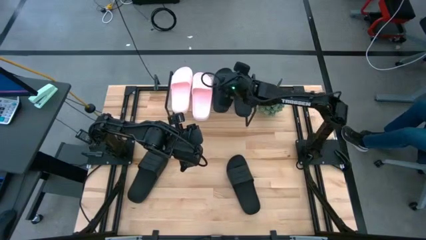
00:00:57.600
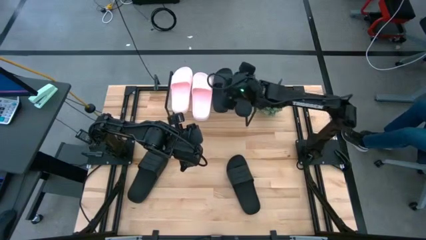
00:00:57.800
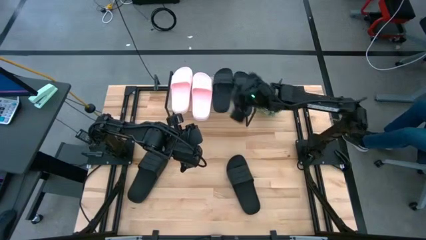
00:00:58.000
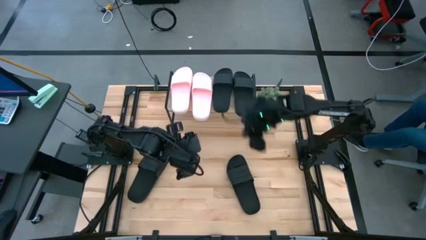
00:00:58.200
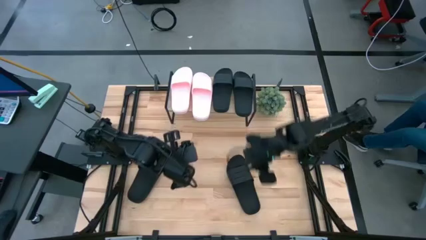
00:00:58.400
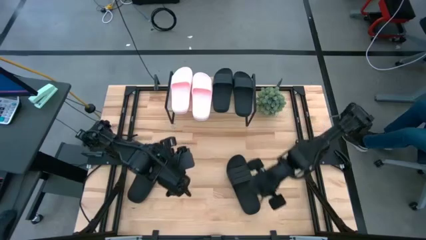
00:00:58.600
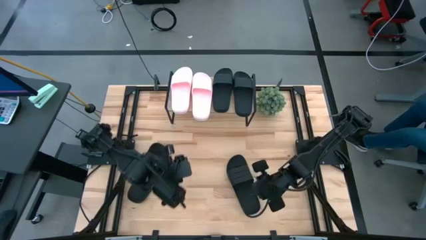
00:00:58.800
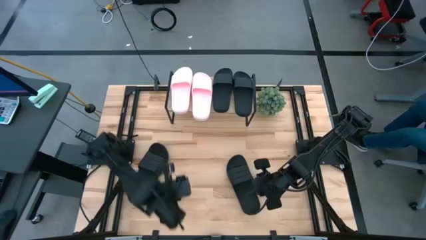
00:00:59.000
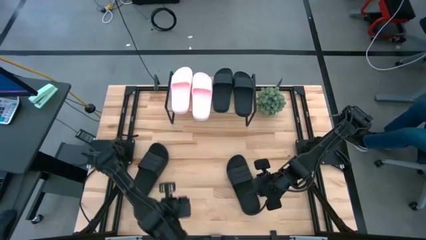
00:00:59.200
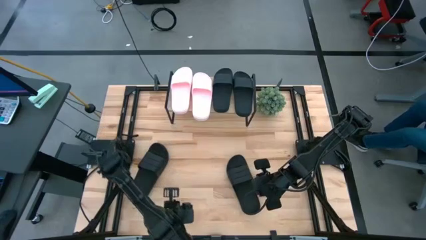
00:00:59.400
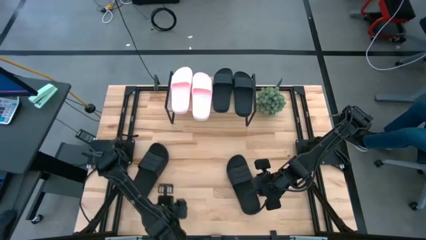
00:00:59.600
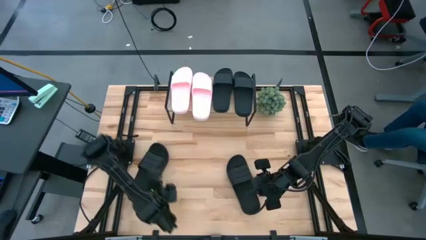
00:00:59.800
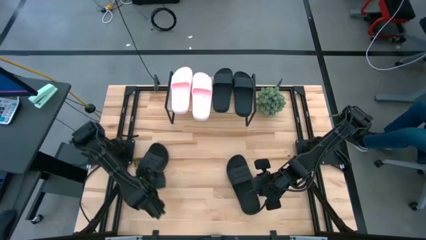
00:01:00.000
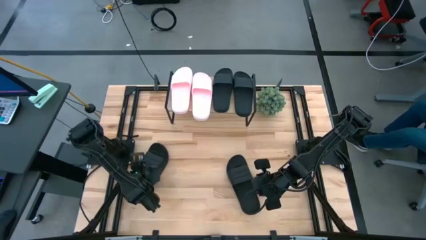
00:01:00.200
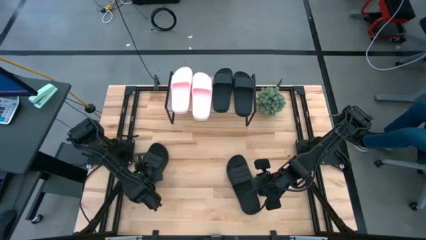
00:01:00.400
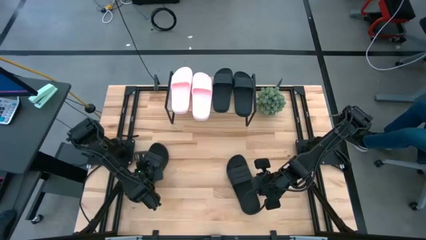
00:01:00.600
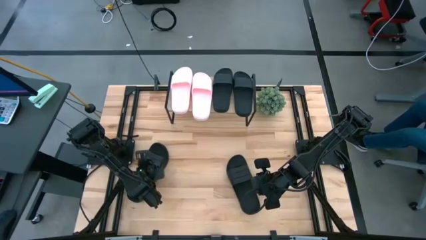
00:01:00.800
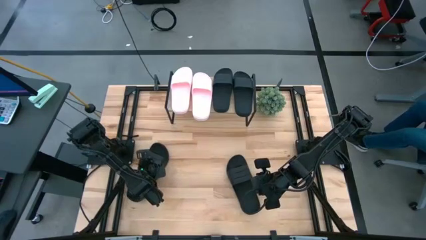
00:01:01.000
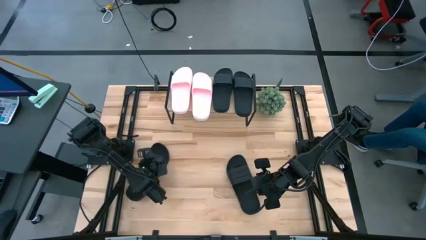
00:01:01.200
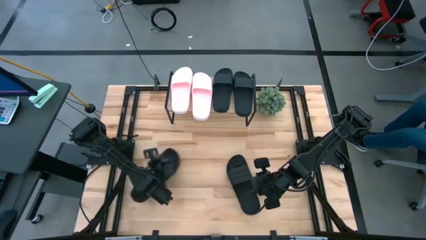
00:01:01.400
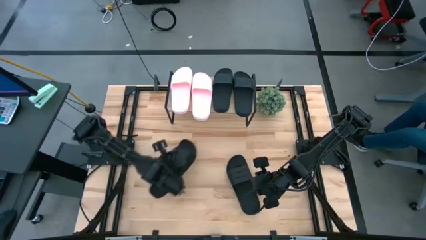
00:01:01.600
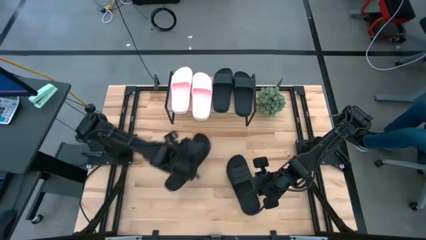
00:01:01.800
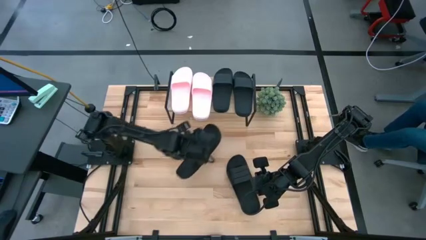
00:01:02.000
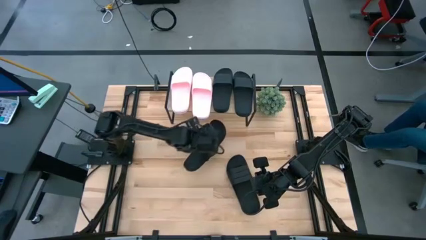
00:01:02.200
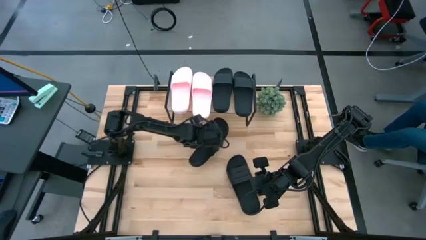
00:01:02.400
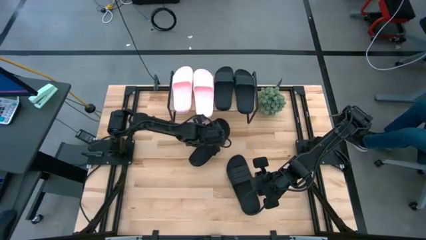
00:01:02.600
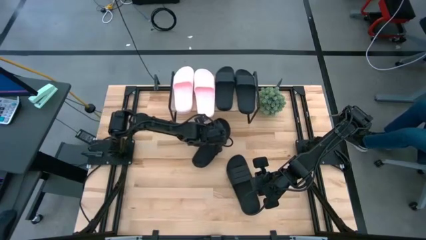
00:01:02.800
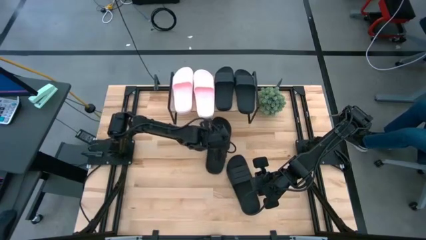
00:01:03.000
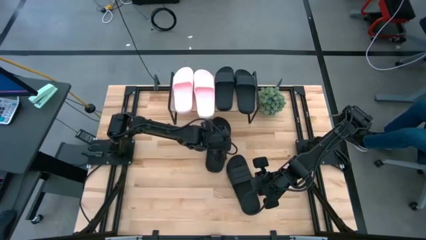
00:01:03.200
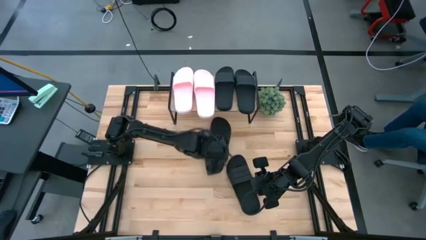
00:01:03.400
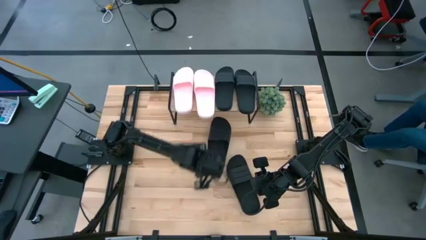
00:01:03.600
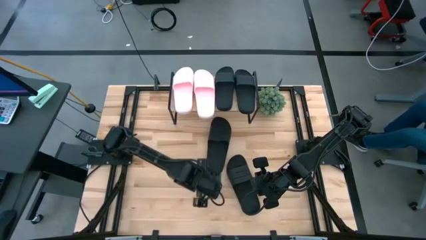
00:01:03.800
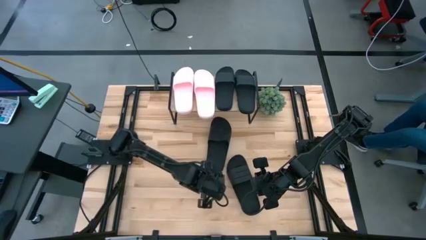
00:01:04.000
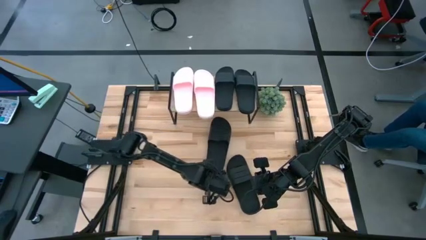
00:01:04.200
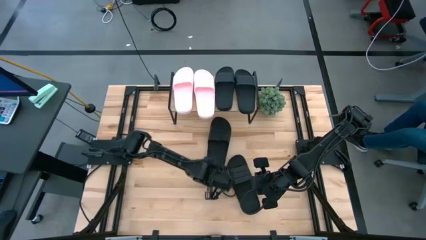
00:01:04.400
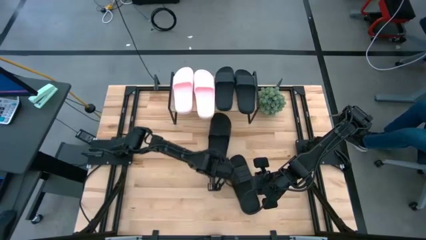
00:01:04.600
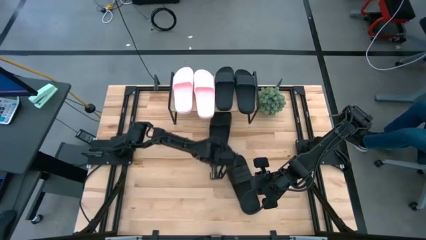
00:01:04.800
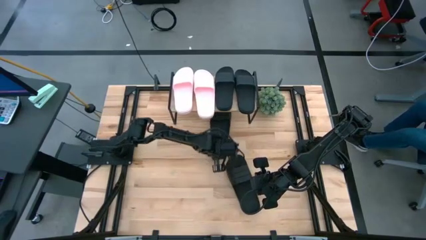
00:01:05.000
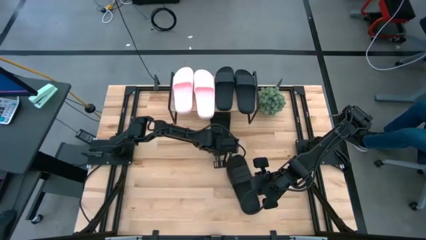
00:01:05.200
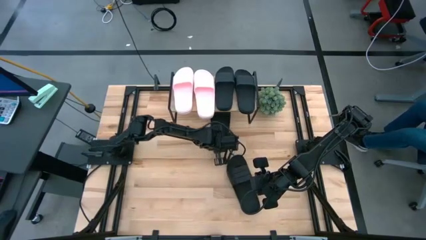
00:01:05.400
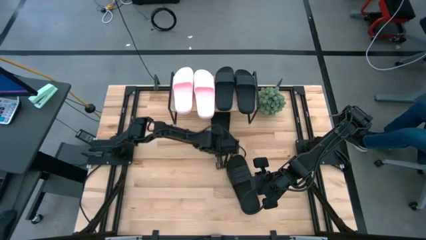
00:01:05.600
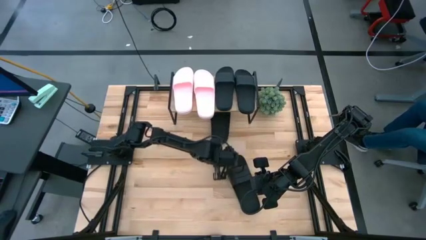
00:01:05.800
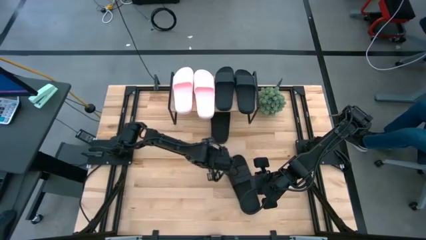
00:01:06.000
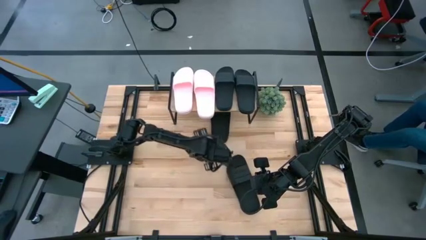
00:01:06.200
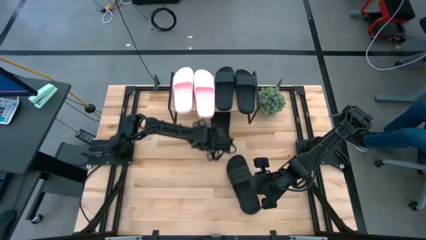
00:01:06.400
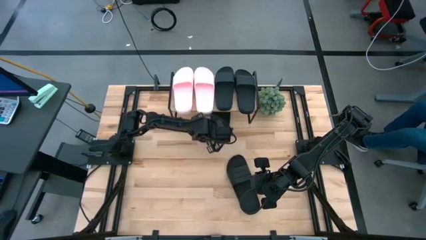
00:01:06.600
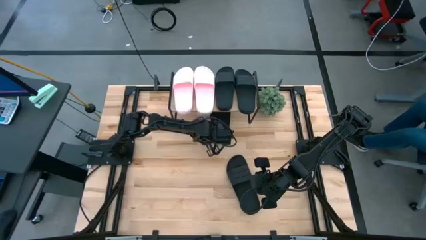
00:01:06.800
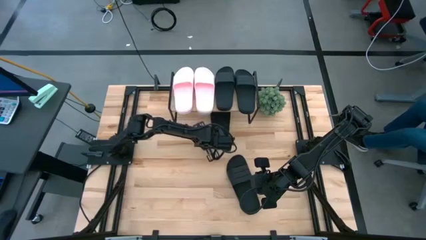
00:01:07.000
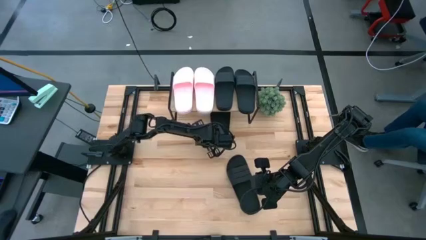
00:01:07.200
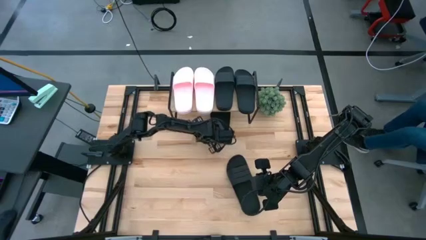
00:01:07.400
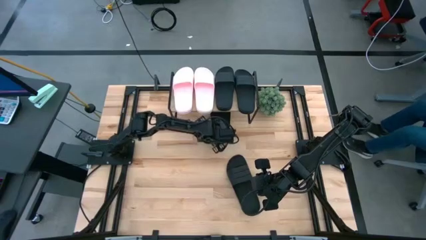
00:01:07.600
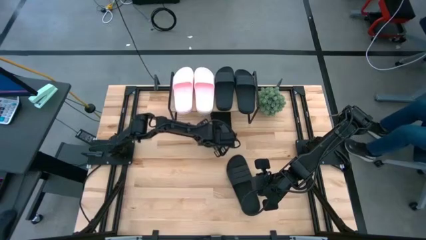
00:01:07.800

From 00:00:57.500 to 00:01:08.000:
Task: Pick and place slides into the shelf
Put the black slipper under the shelf

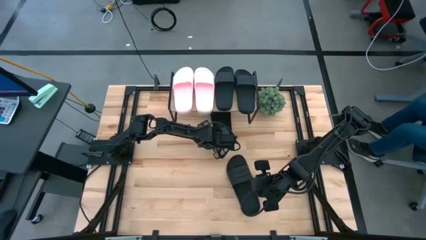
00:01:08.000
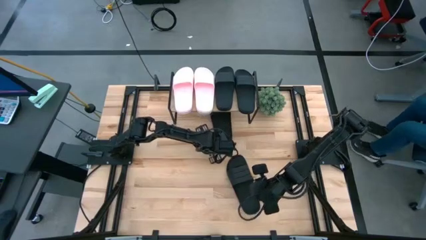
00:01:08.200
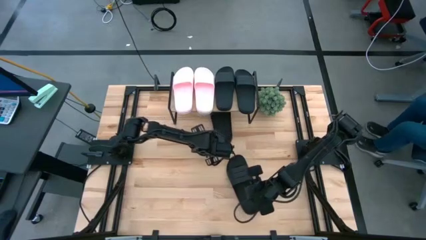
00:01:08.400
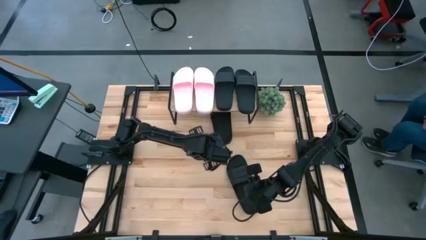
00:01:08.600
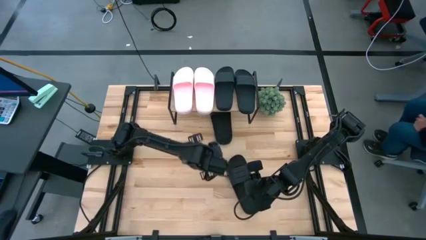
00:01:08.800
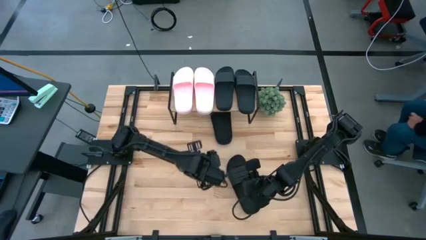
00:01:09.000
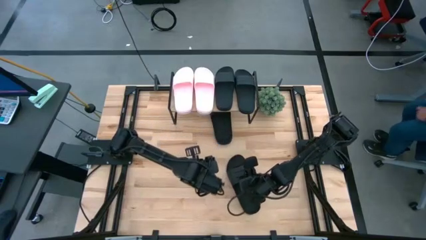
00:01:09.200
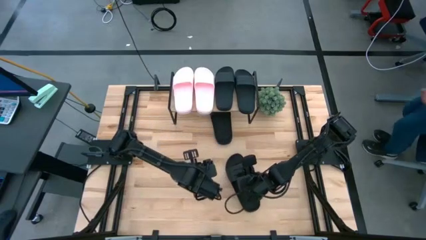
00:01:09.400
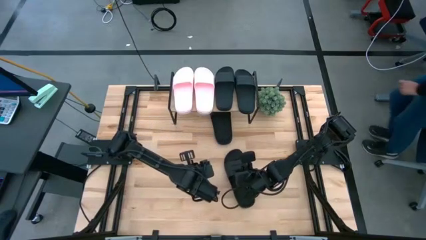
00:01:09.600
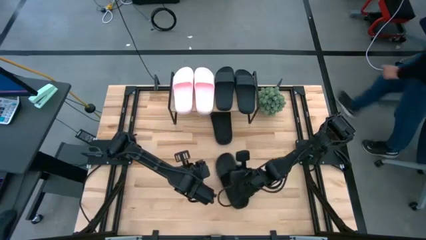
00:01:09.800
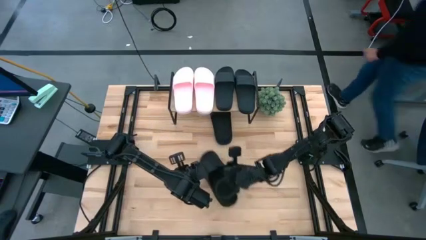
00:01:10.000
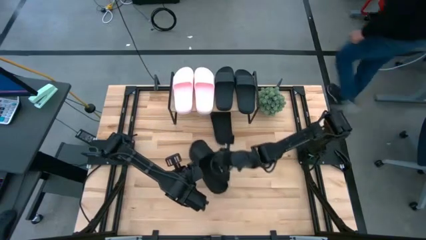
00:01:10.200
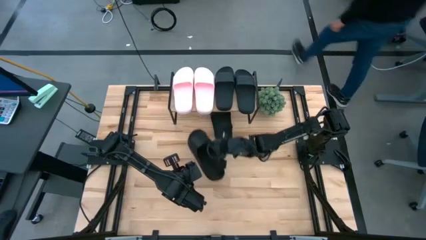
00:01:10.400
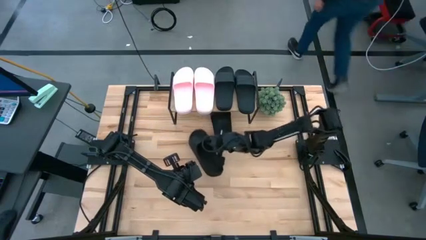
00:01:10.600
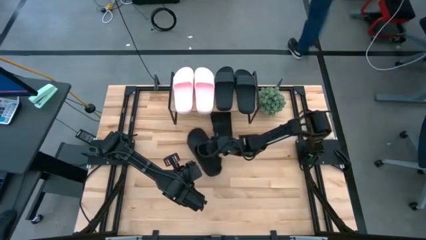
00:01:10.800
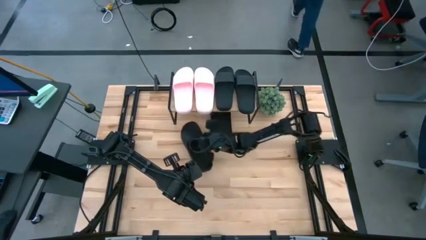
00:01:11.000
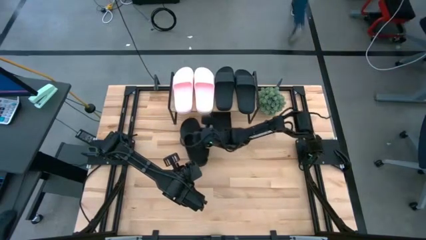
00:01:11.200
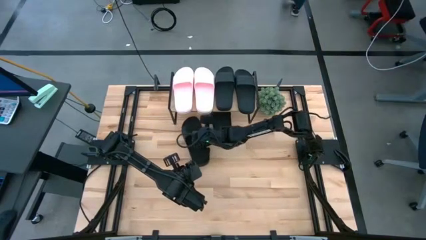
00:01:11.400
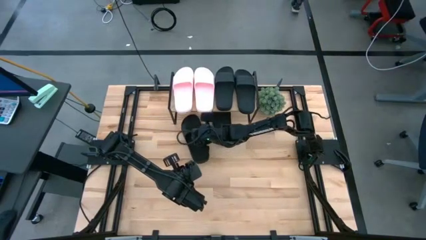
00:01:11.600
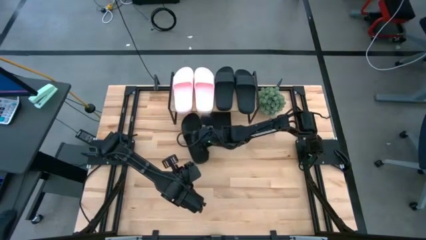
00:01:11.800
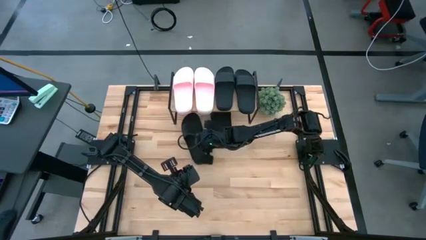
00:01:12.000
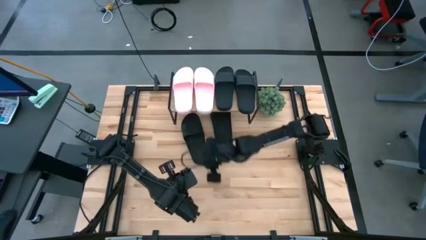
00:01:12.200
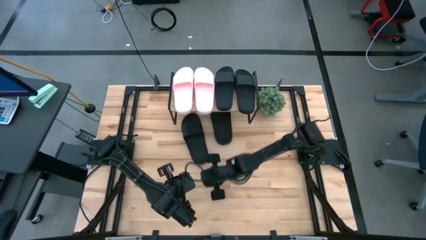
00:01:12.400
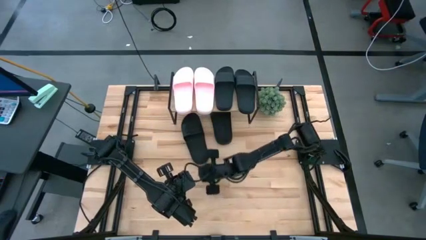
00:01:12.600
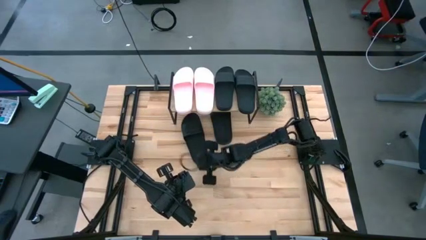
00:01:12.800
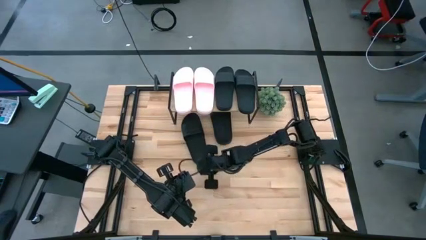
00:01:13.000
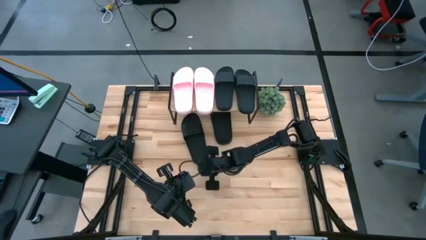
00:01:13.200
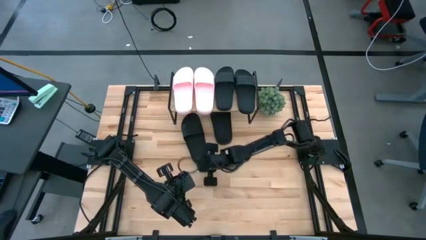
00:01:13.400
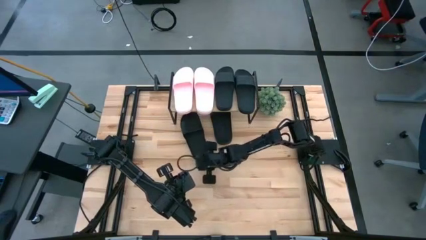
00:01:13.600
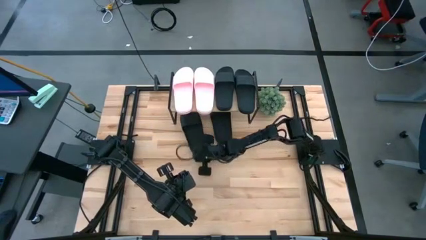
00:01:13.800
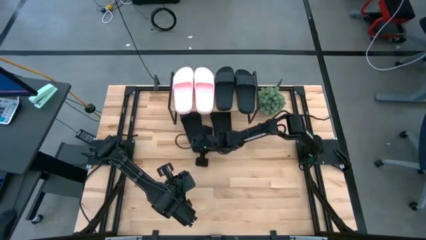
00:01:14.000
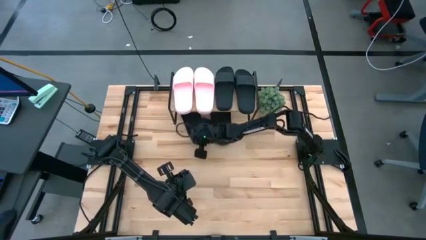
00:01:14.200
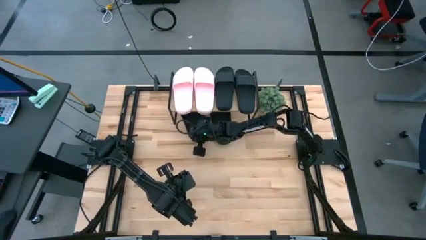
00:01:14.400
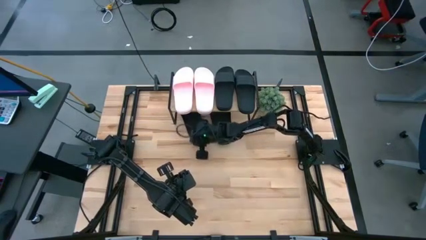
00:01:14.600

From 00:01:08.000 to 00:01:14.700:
Put the black slipper under the shelf

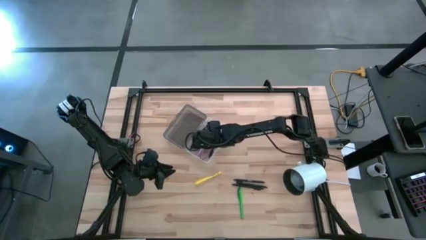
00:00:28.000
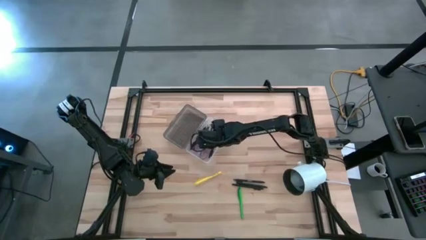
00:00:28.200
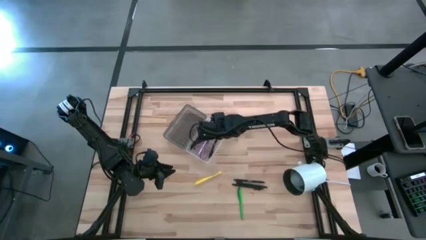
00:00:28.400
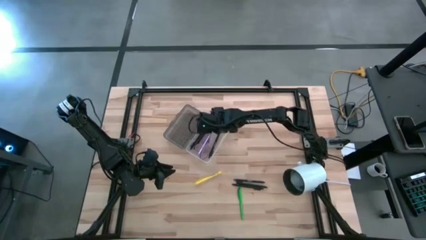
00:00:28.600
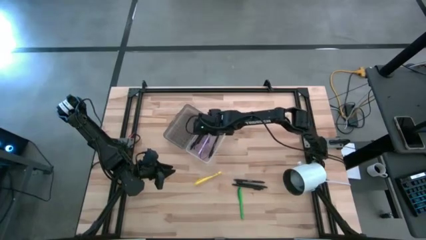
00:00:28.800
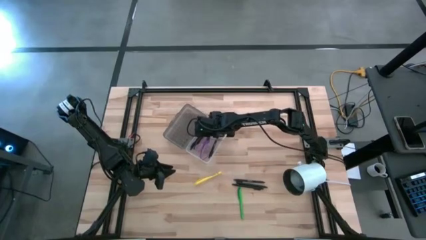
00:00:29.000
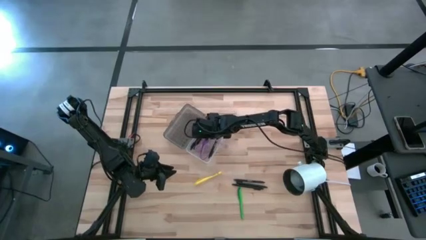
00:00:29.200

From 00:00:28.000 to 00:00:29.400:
Task: Pick & place school supplies into a supply box
Adjust the purple scissors in the black supply box
